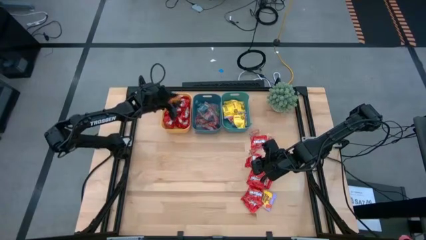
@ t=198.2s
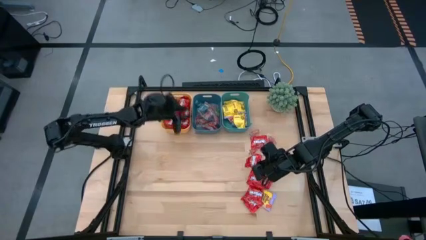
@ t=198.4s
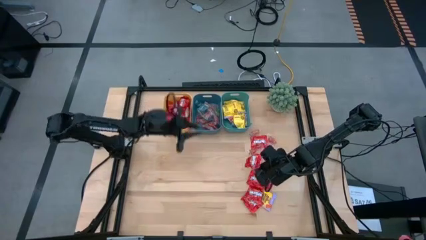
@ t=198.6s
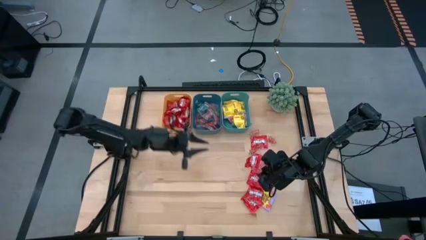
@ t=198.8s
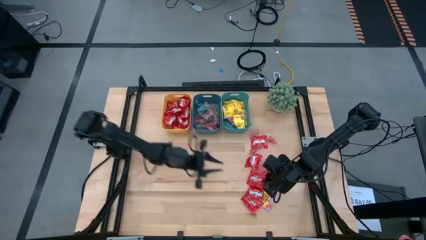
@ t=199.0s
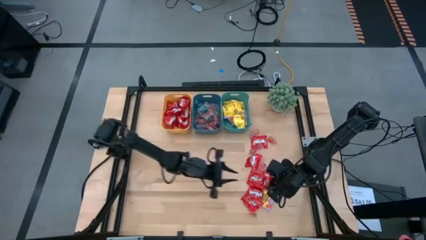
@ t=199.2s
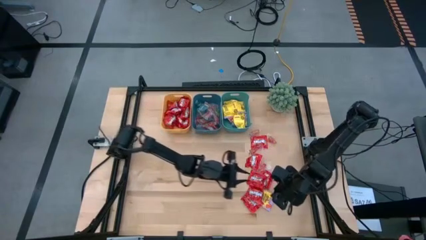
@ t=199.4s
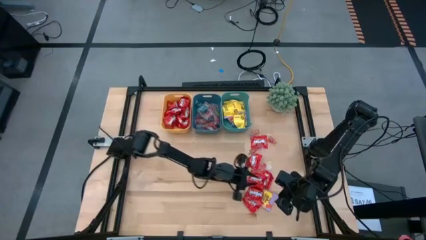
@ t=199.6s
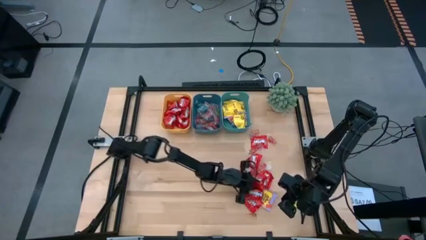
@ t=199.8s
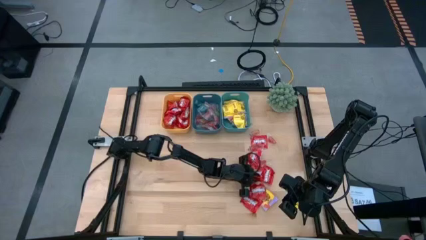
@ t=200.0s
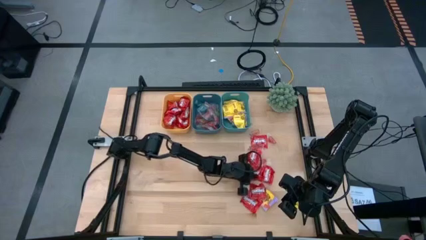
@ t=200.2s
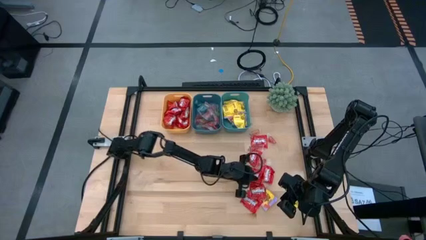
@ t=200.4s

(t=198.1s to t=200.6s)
Task: Sort candy
Put the red candy into the yellow bin

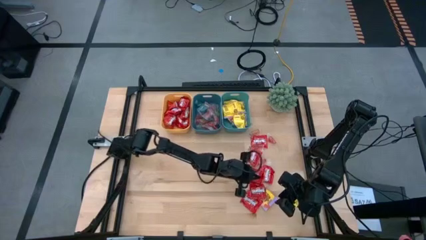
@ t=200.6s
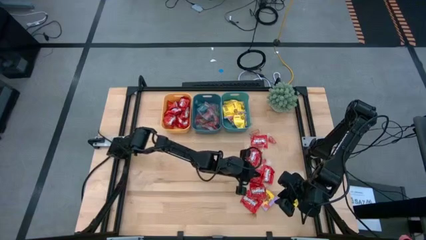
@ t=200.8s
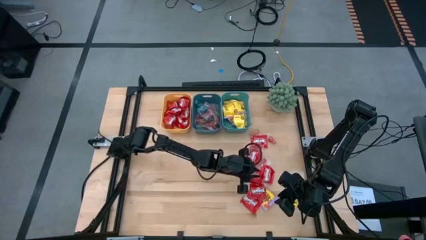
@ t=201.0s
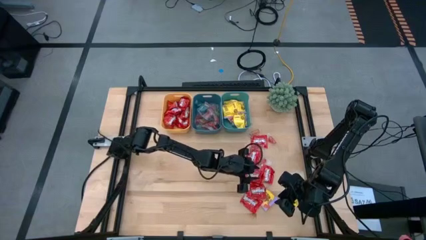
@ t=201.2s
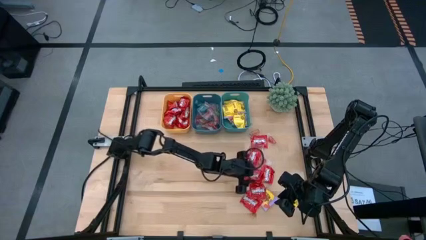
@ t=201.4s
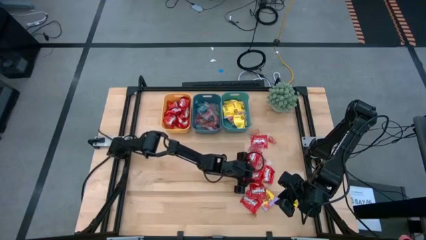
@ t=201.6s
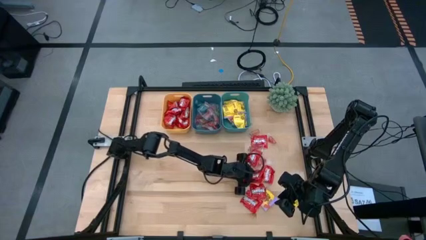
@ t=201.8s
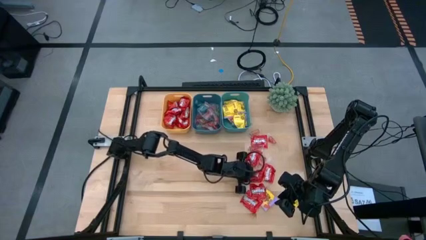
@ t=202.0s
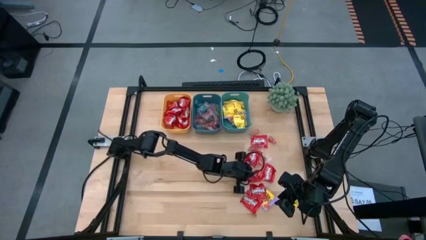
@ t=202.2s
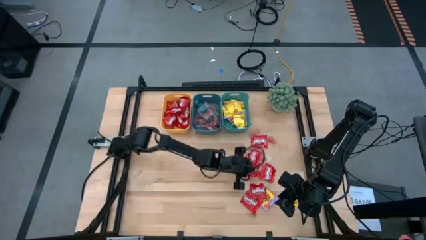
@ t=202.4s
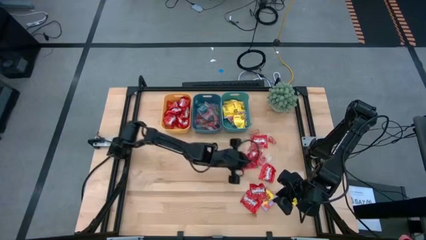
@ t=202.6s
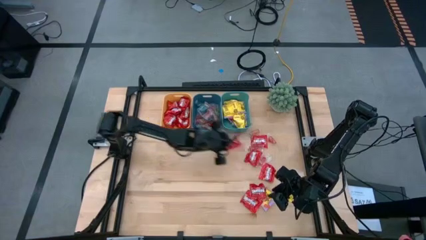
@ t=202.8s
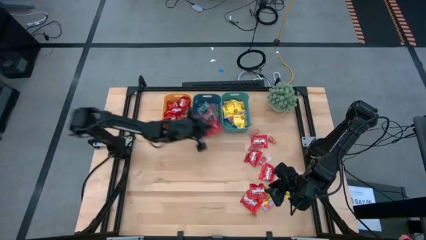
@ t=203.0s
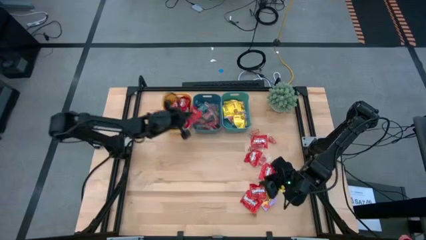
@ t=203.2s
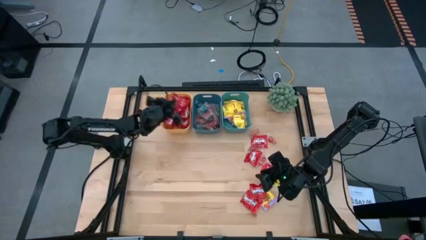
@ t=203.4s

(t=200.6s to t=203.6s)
Put the red candy into the yellow bin

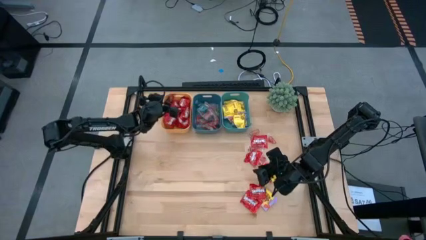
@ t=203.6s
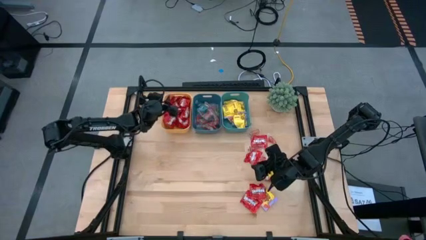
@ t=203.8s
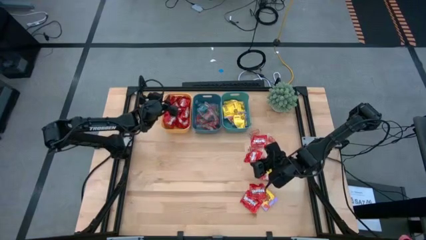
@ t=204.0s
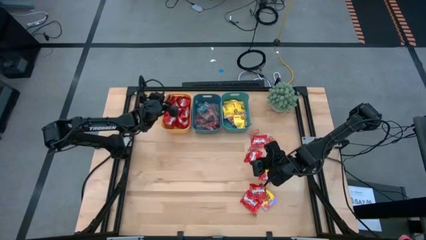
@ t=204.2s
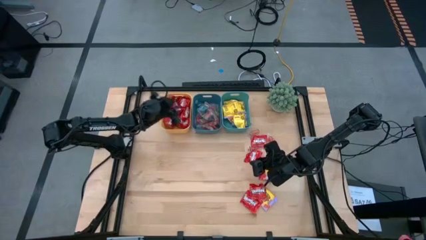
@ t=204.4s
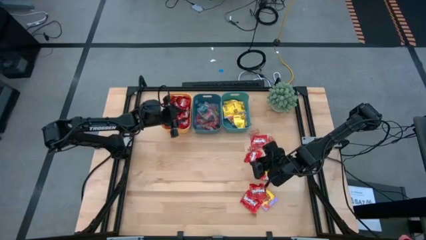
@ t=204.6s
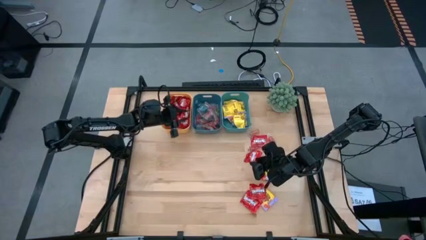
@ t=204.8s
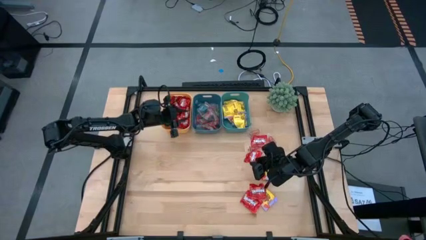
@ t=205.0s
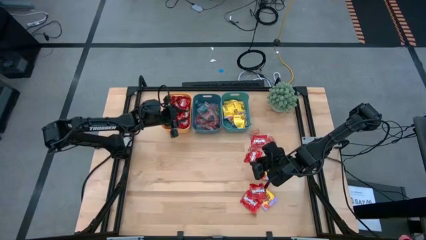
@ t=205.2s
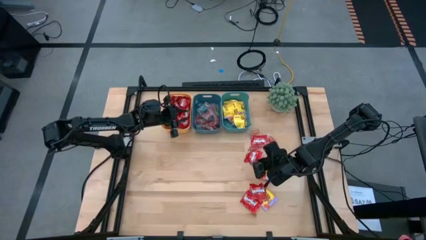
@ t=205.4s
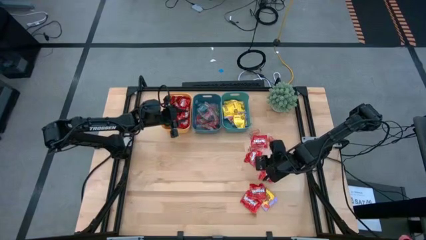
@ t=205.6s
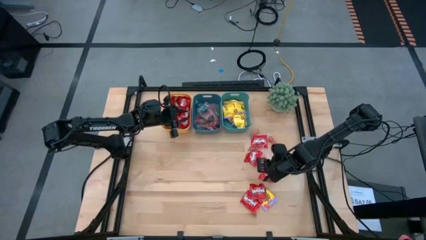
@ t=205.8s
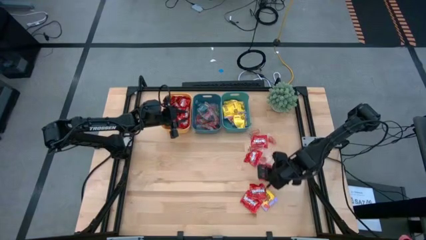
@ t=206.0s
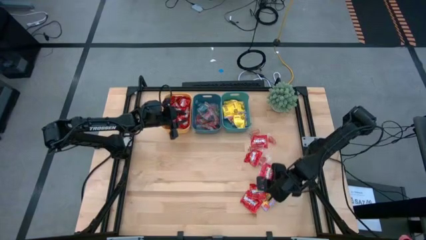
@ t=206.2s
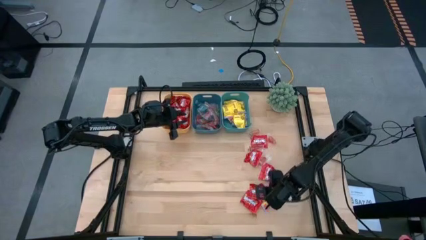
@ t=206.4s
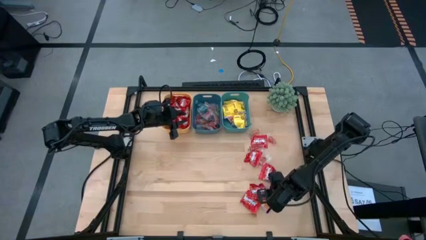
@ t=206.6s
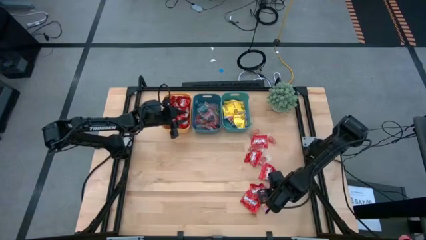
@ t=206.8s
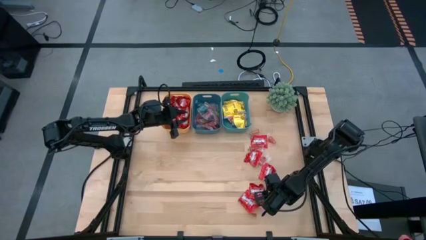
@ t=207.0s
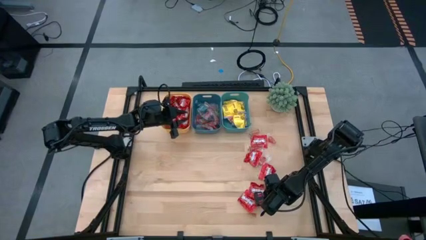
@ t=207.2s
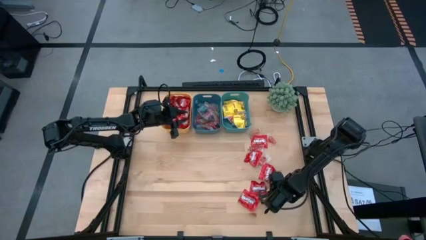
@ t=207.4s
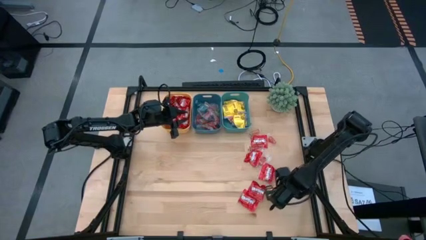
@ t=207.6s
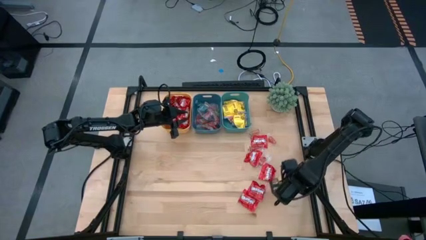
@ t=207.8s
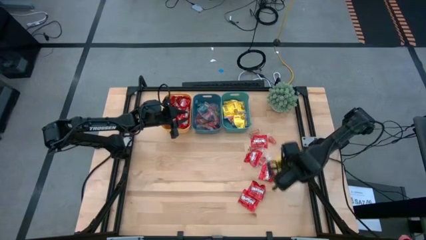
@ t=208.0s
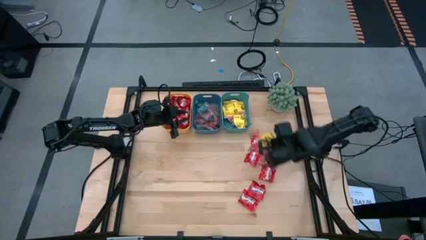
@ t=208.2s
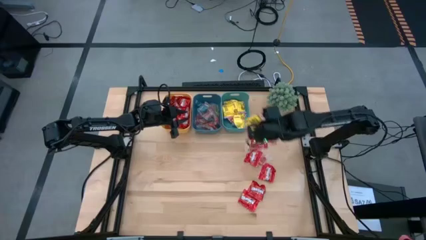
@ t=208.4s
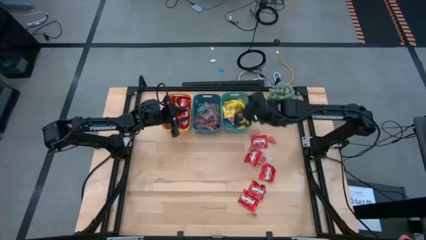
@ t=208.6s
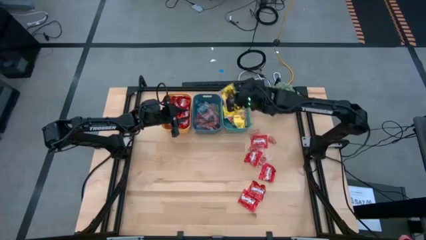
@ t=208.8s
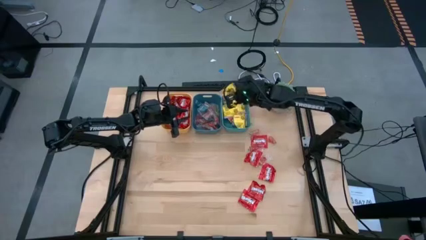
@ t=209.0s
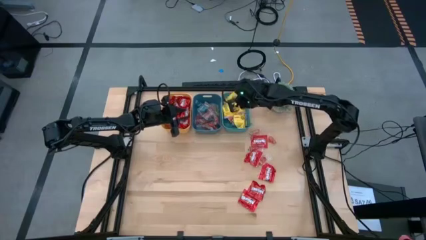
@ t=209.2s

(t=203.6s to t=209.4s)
Put the yellow candy into the green bin

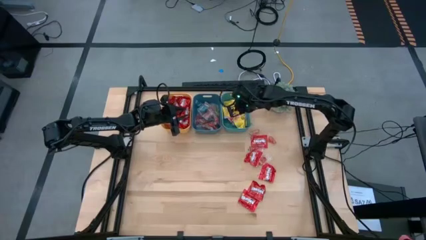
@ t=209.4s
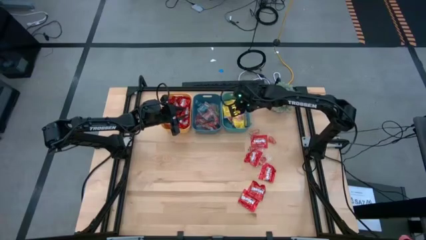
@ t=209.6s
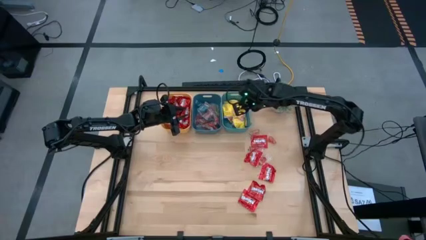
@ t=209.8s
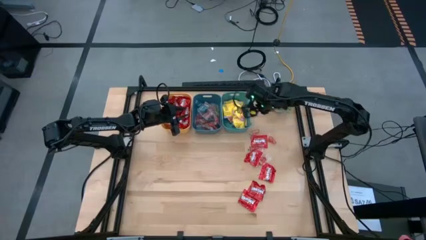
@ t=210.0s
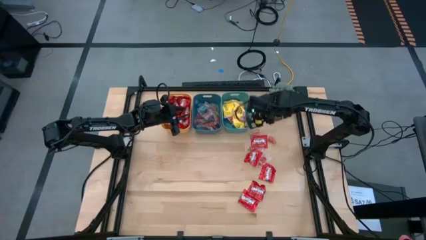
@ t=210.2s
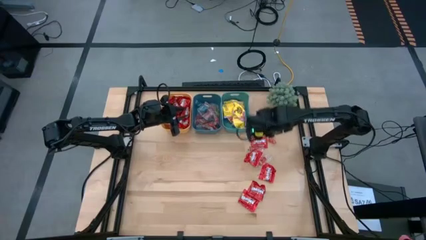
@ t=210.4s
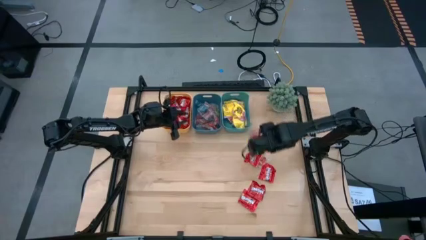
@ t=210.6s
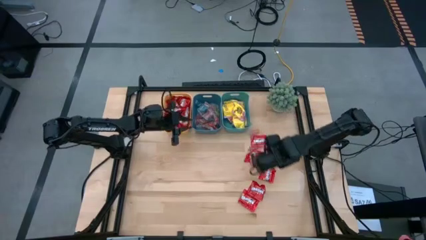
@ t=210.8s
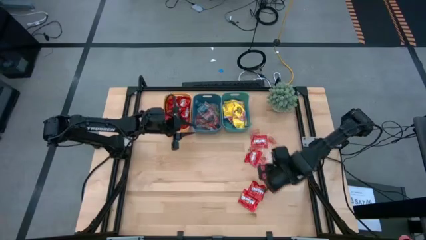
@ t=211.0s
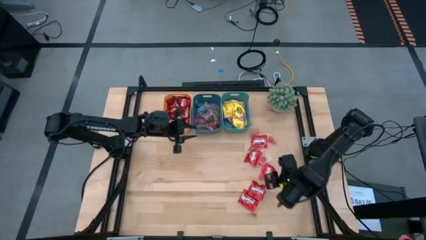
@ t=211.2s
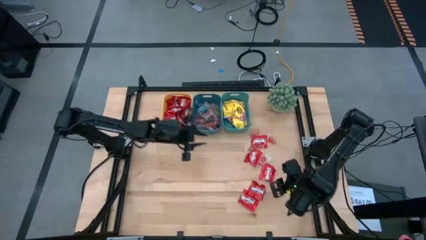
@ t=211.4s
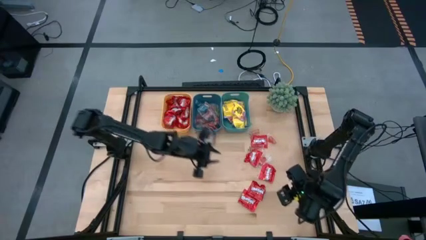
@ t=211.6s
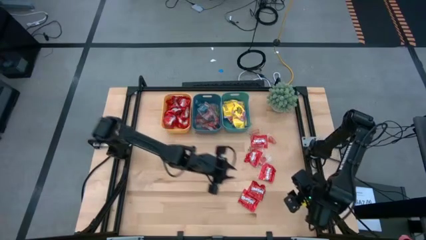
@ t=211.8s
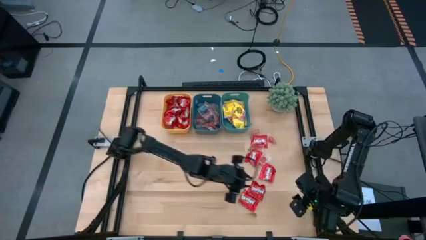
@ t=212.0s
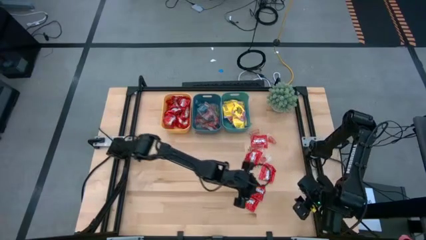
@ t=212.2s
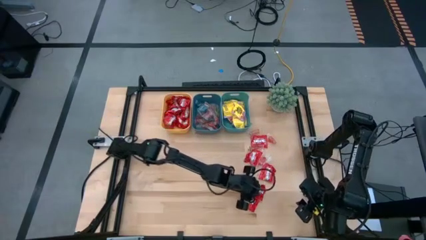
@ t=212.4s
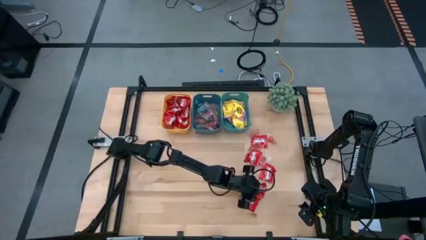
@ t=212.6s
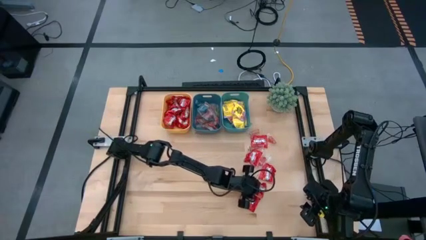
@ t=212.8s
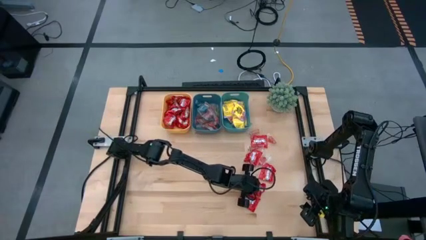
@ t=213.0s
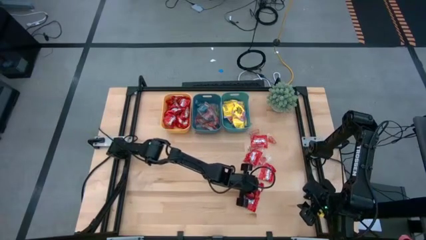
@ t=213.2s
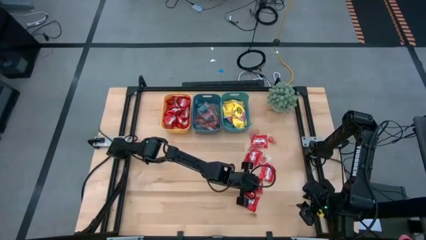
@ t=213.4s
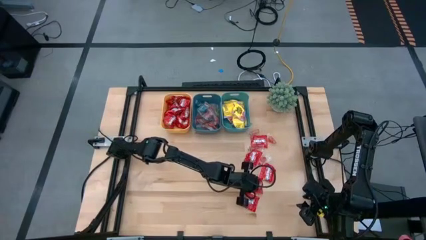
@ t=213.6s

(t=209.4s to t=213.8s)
Put the red candy into the yellow bin

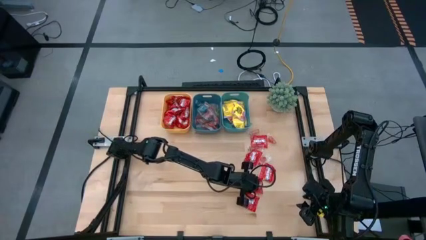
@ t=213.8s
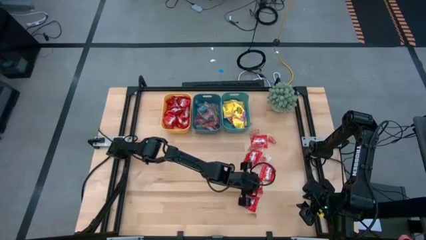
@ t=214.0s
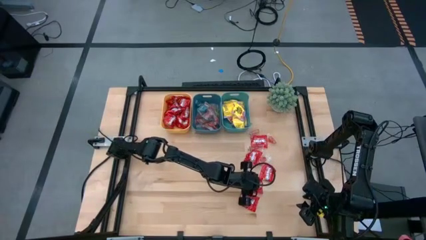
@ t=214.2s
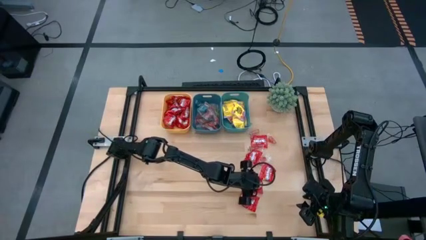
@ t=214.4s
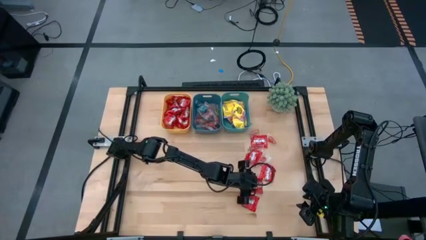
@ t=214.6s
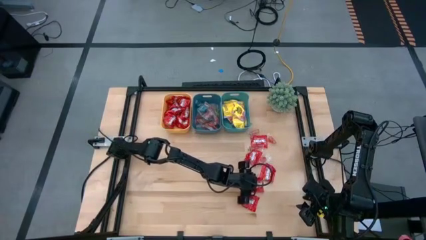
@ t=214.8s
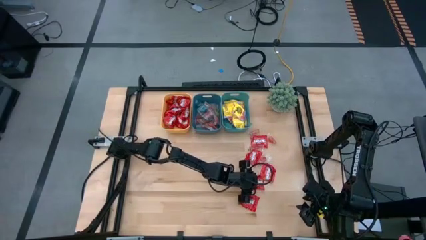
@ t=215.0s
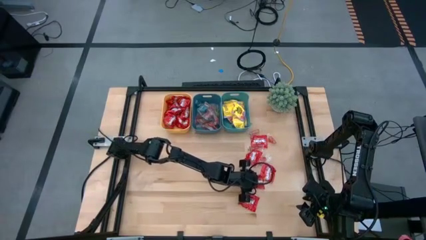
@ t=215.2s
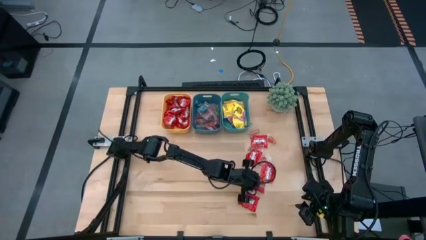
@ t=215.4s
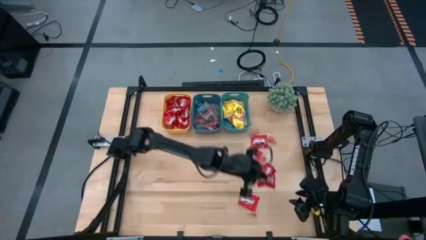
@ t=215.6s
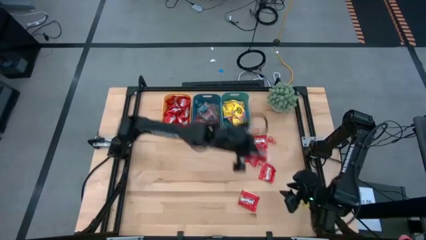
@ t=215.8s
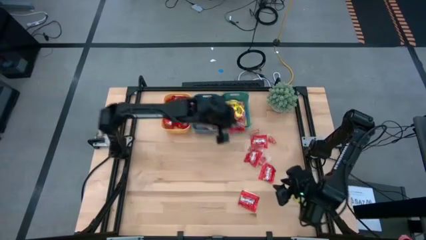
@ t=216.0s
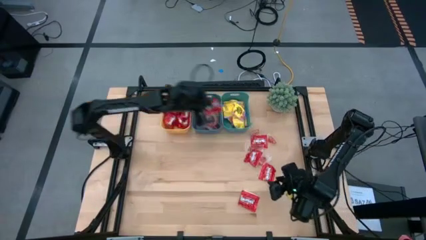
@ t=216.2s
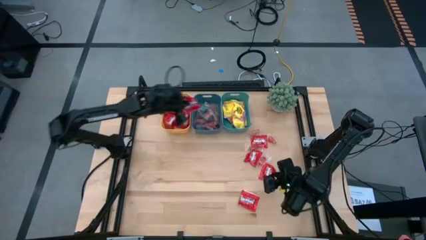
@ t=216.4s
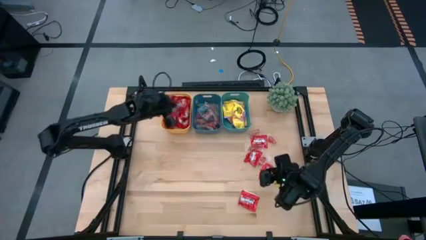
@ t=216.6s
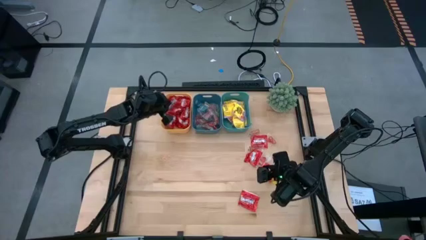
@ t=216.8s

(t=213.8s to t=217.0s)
Put the red candy into the yellow bin
